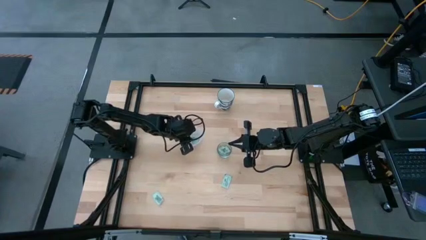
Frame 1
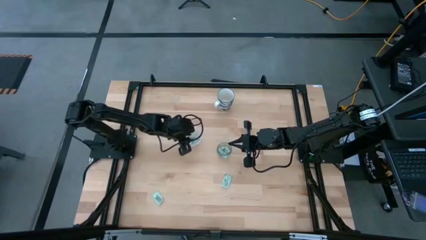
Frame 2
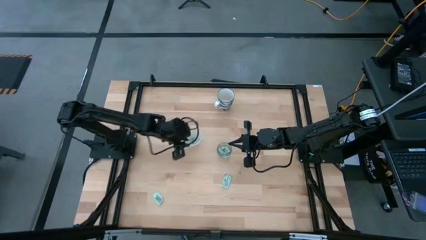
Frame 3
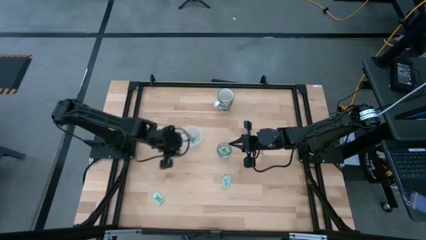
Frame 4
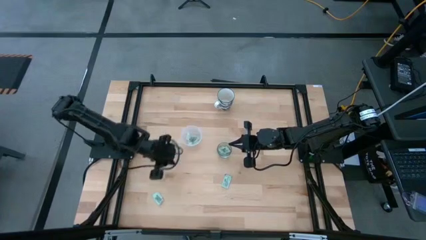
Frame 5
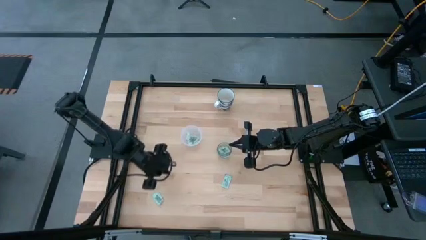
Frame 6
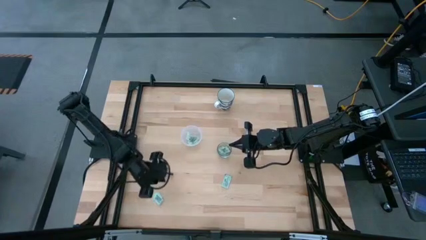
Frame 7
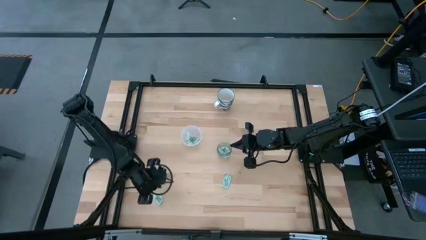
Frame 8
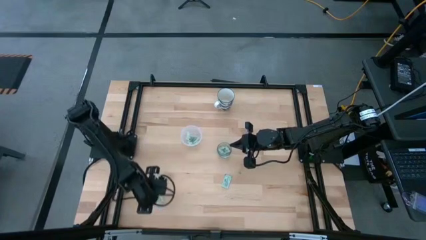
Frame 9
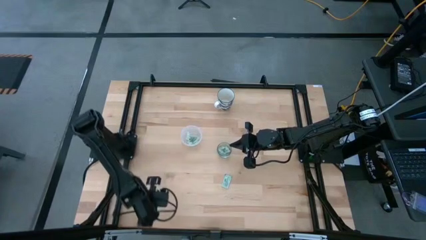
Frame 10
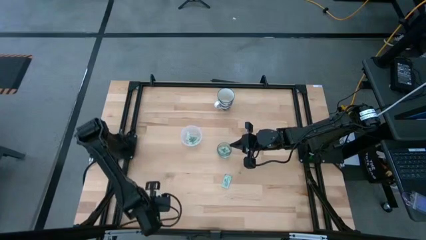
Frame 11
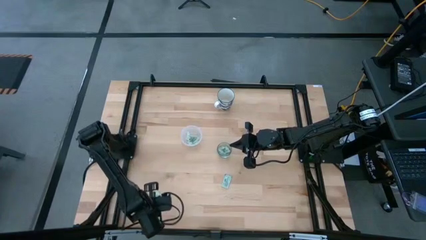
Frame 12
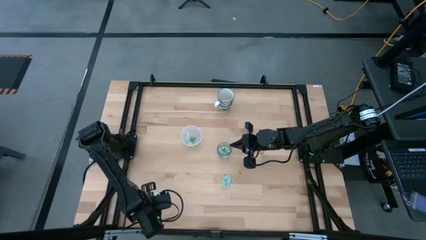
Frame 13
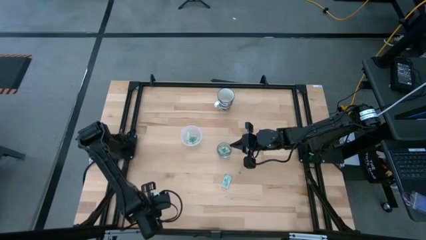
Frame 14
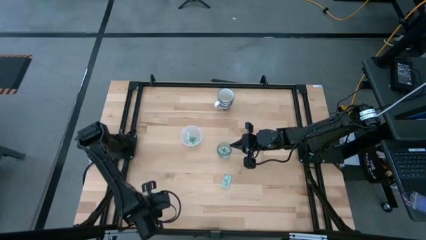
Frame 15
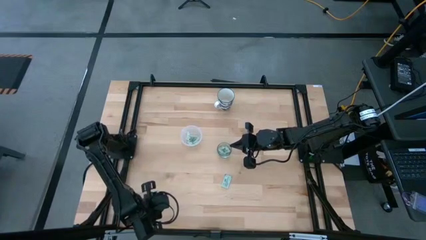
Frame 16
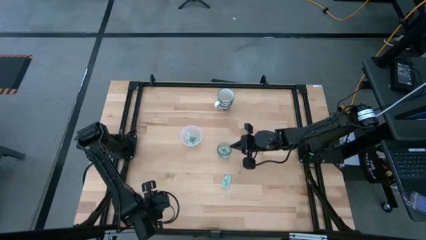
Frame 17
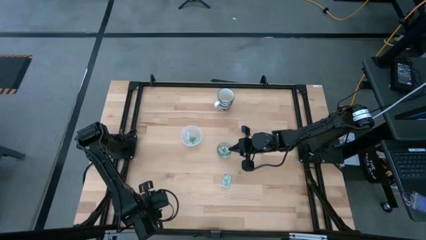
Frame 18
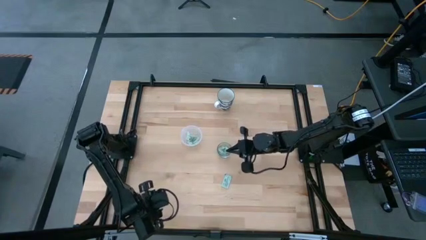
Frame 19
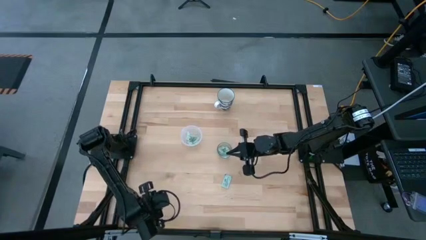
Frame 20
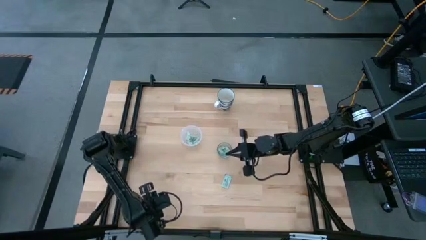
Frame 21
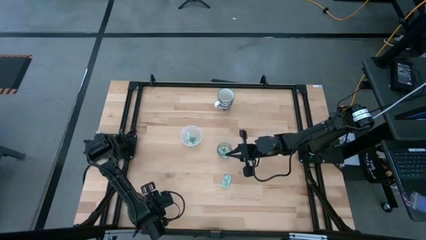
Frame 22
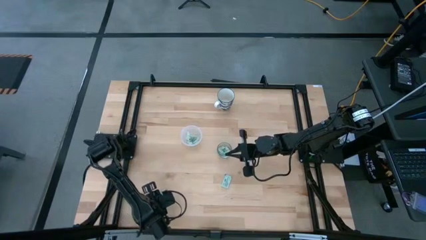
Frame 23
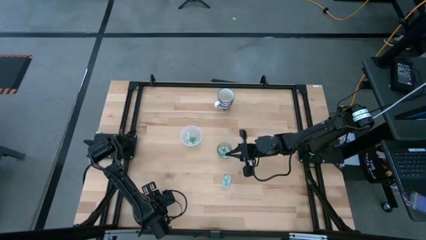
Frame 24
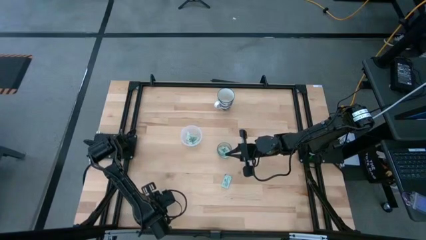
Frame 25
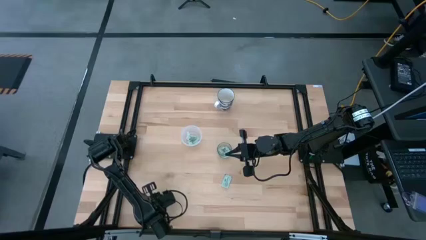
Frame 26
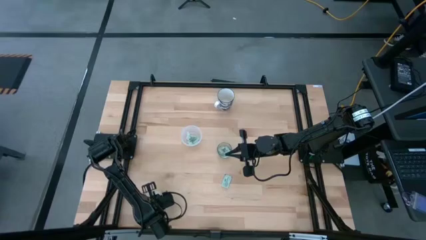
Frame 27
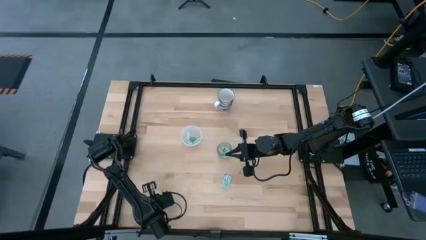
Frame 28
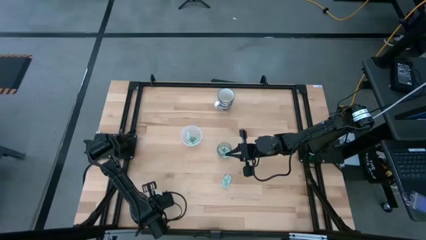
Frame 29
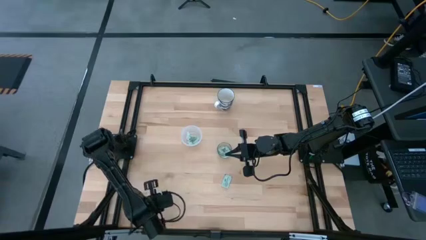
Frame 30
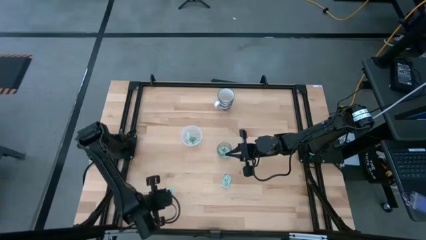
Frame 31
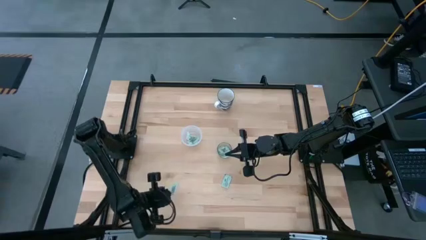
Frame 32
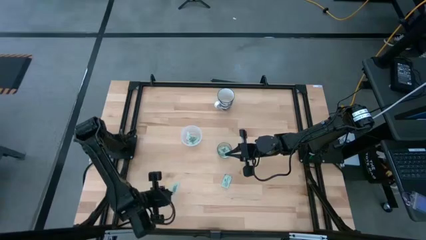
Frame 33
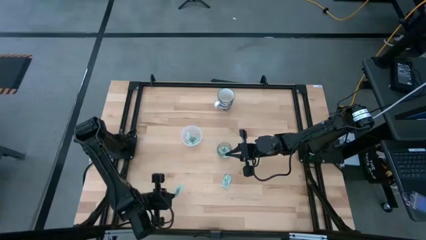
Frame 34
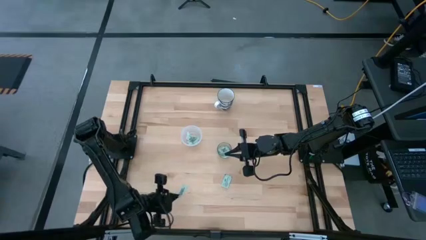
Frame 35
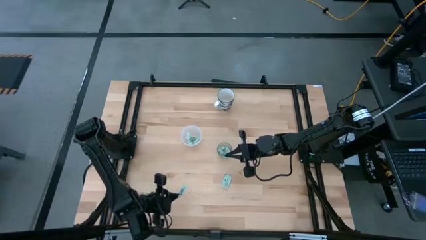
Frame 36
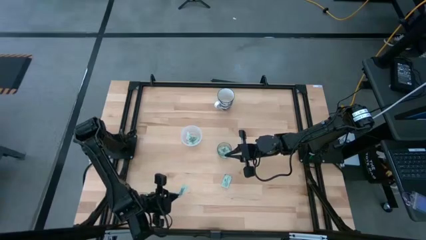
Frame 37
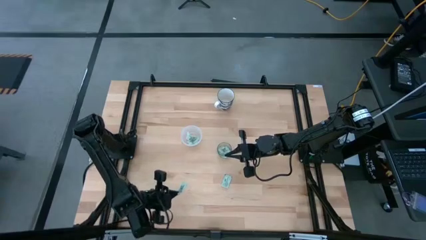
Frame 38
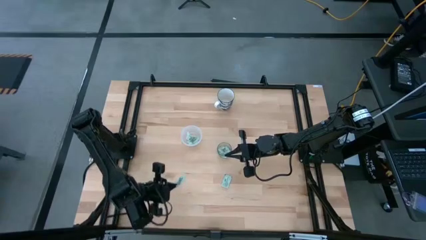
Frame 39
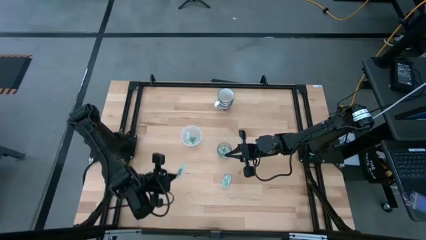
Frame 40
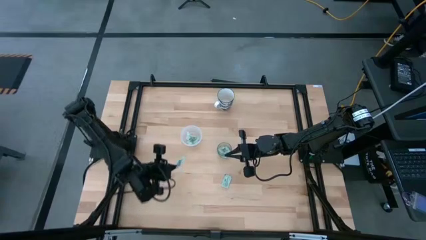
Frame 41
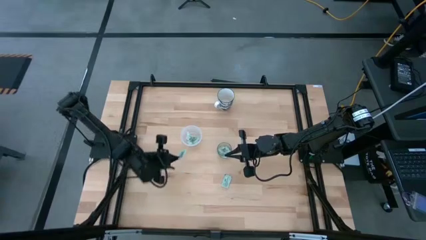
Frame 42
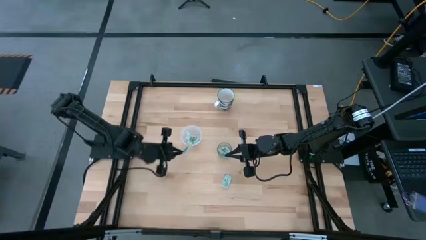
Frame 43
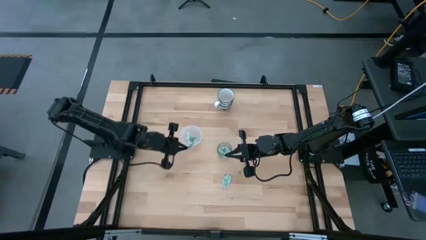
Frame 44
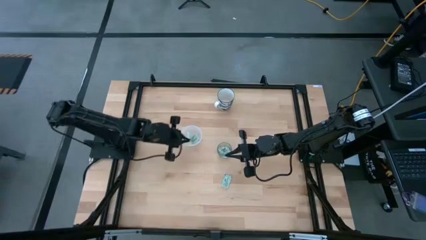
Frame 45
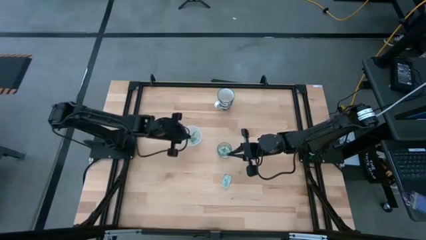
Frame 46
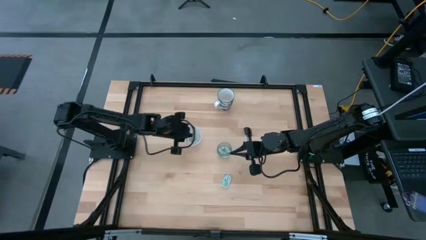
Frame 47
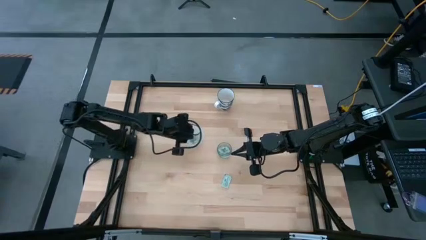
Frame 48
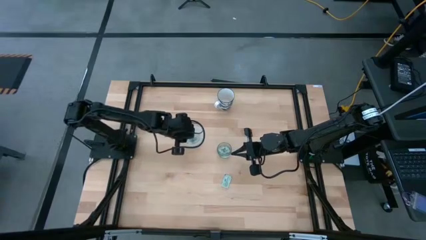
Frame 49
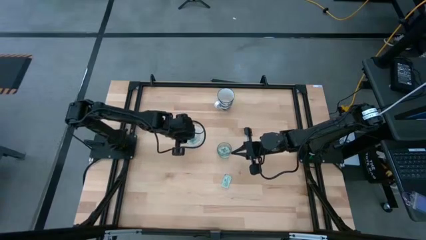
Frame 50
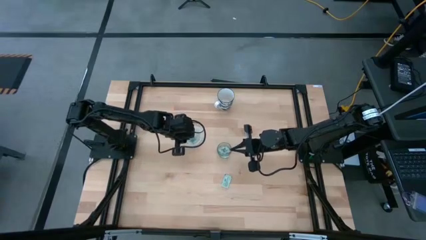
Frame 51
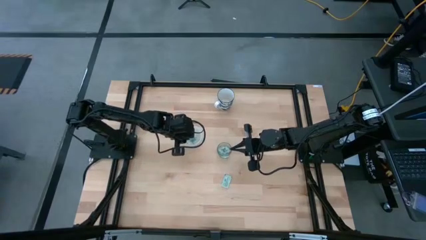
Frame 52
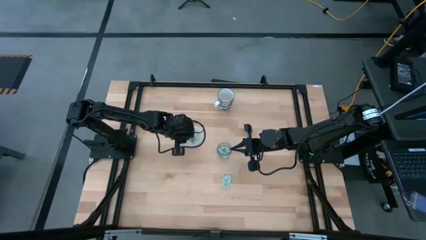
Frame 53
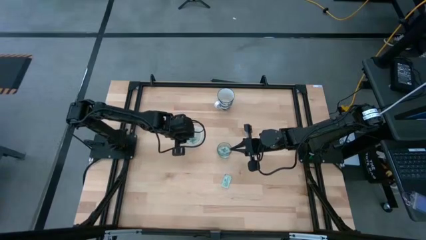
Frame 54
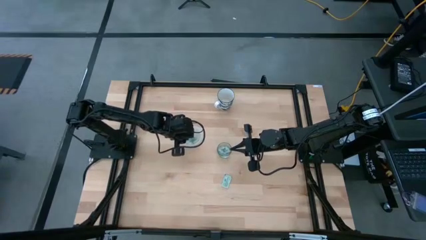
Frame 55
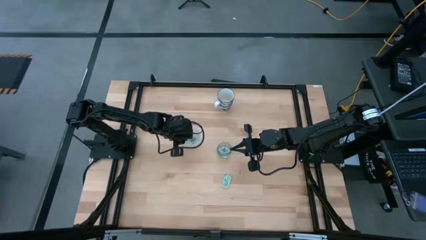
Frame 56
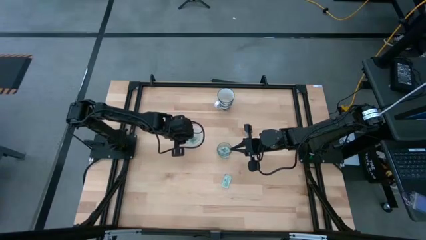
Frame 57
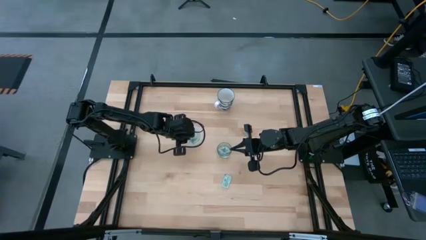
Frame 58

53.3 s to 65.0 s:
Task: Pick and place Stevia / Truvia into bins
Put the stevia packet into the plastic container

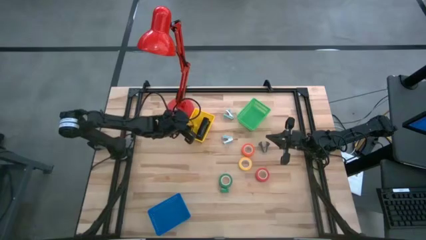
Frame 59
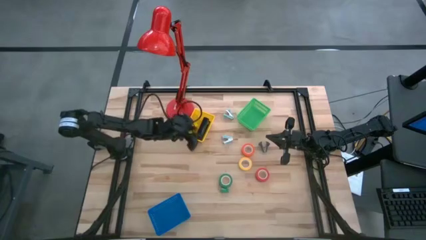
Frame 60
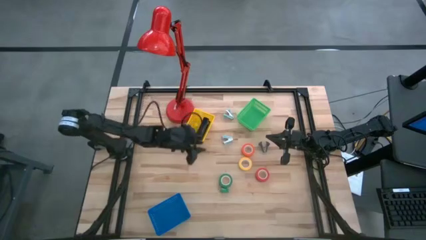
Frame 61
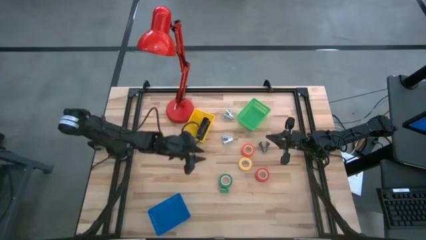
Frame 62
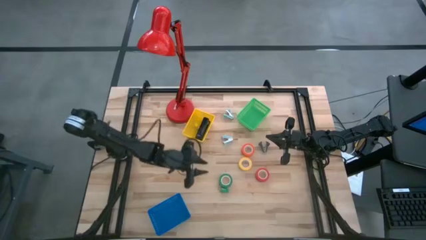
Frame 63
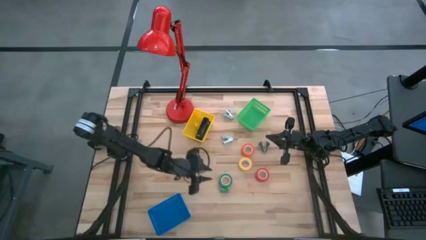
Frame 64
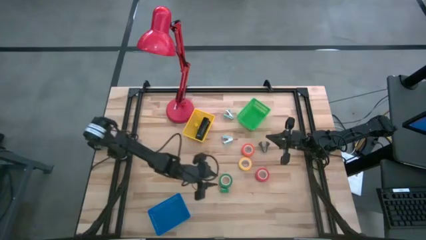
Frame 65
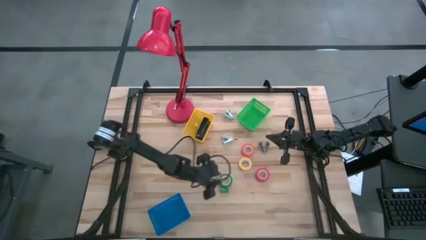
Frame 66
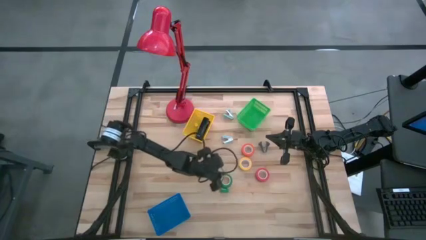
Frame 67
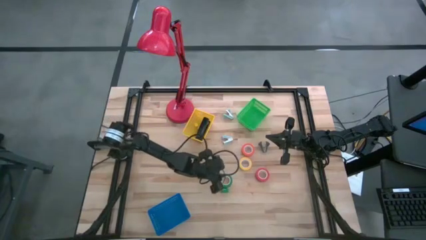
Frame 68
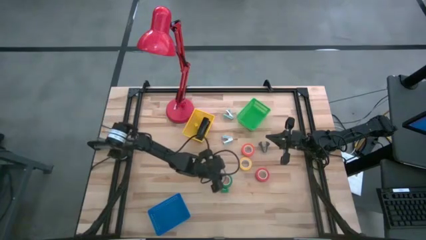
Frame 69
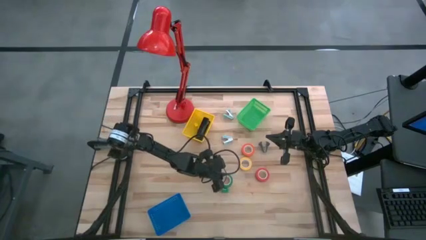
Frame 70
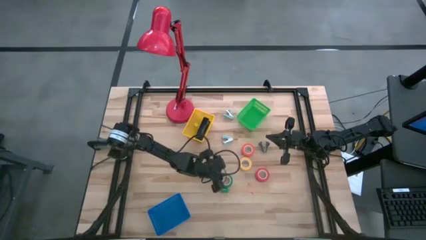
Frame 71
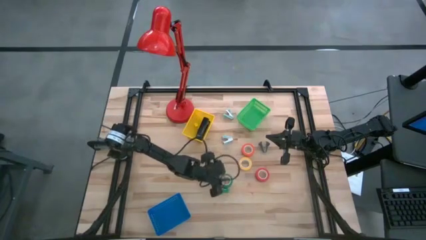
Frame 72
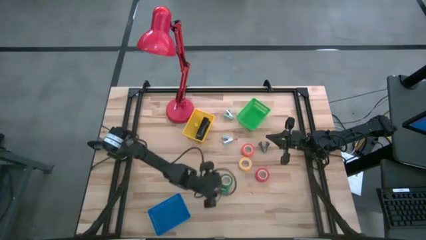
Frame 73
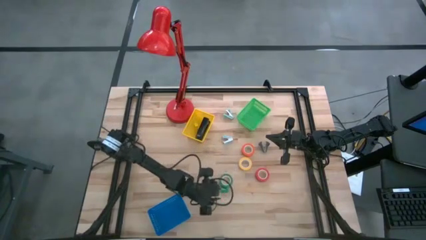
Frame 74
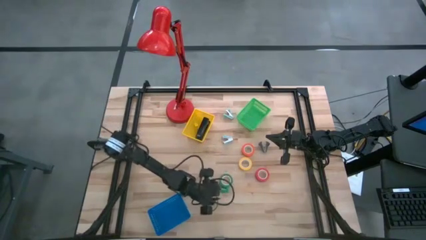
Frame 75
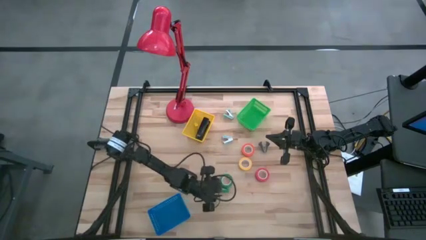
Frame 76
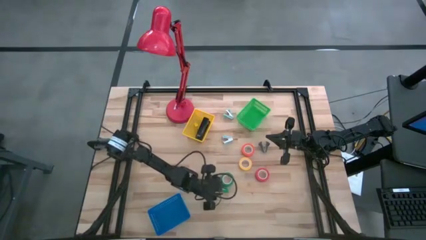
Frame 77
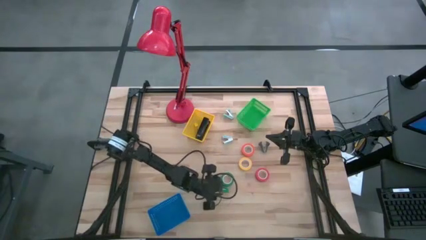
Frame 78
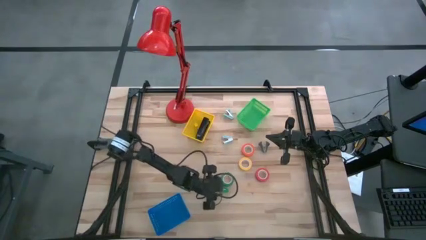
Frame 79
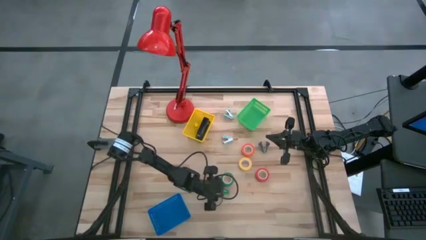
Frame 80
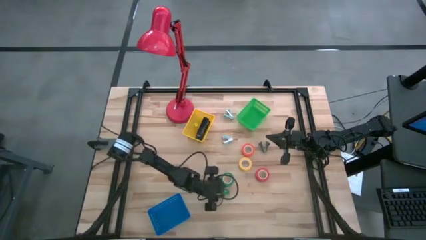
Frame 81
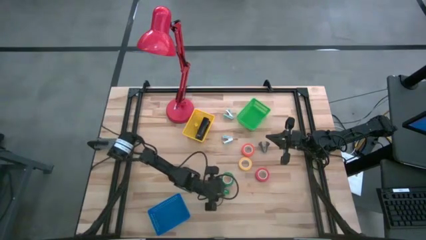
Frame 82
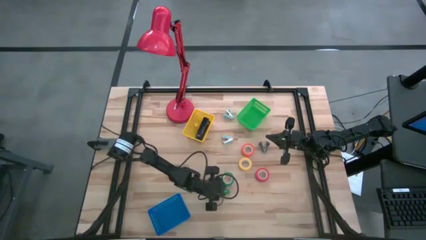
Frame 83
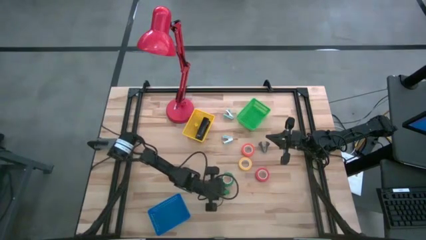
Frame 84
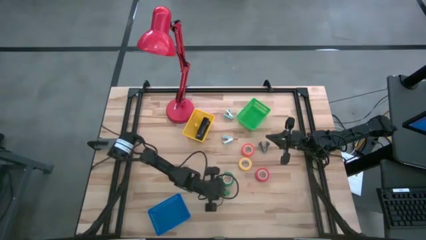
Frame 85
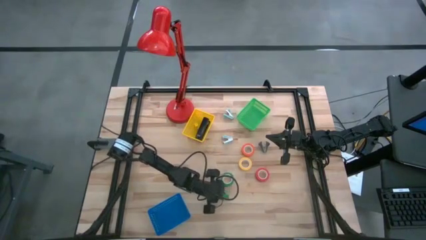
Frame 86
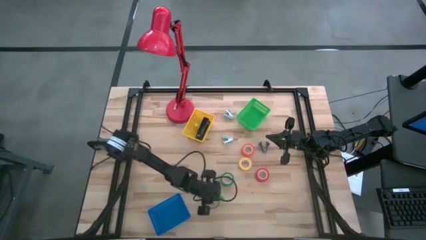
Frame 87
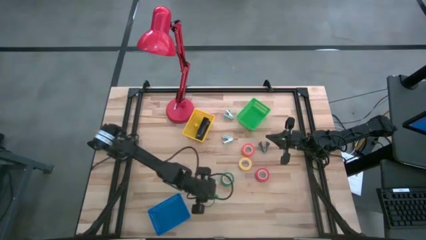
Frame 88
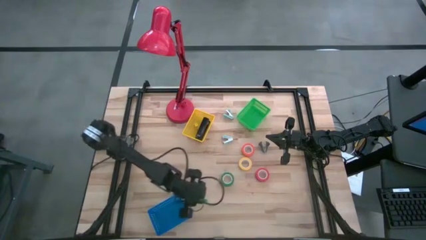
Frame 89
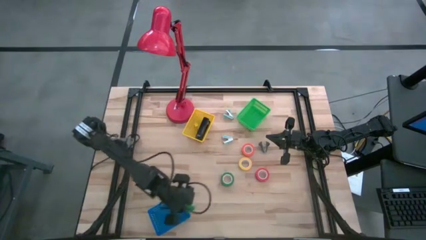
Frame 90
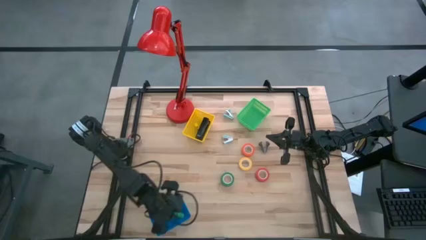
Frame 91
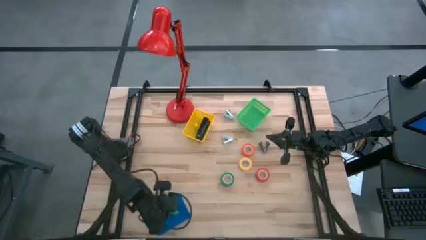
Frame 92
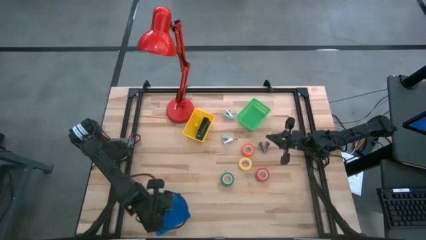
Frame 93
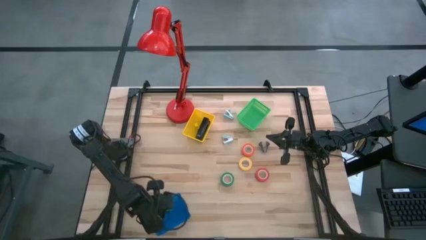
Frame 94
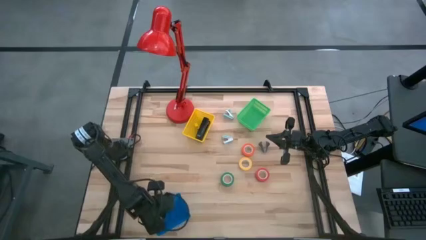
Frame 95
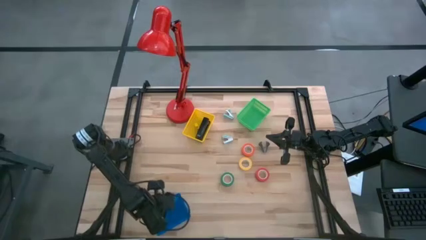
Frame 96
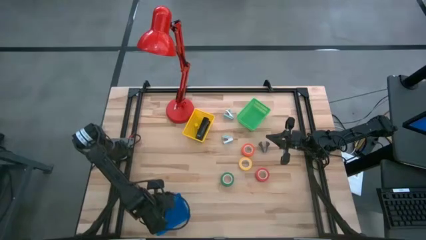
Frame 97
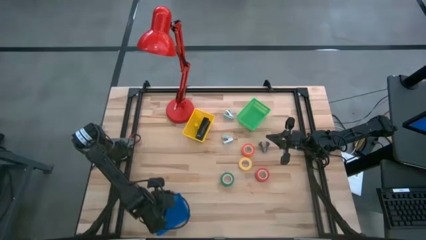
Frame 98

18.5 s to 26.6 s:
Task: Pick and place Stapler, Stapler remover, tape
Put the green stapler into the blue bin
